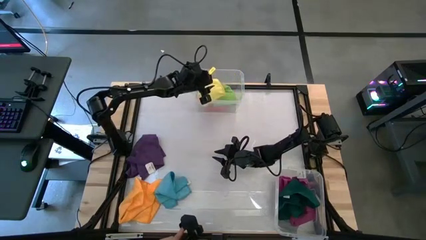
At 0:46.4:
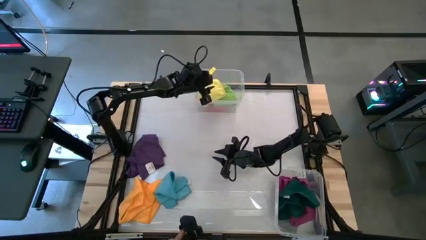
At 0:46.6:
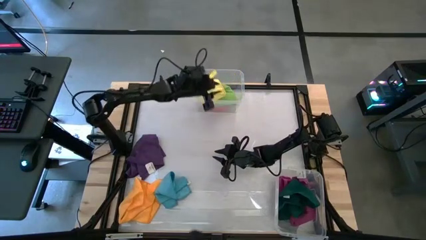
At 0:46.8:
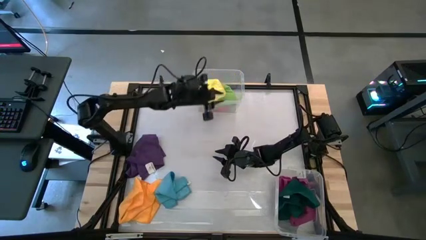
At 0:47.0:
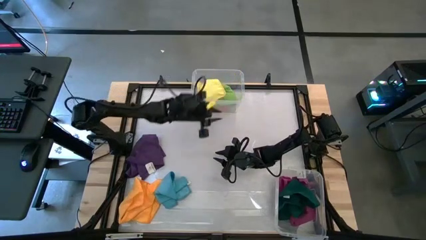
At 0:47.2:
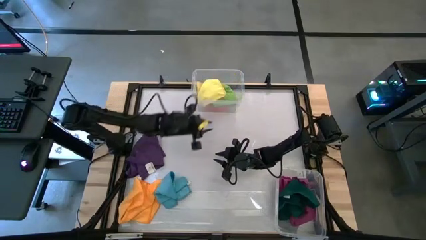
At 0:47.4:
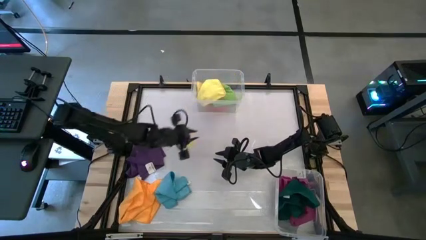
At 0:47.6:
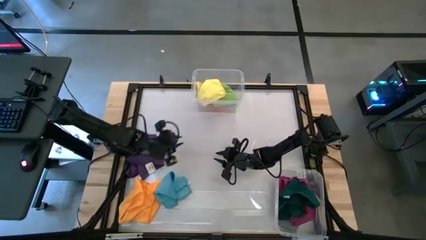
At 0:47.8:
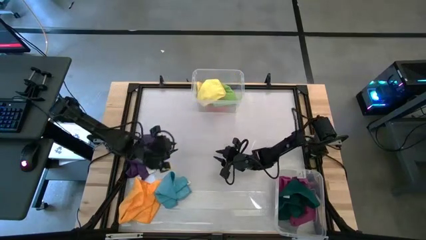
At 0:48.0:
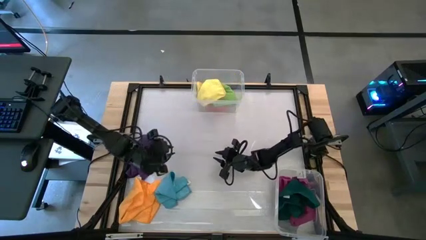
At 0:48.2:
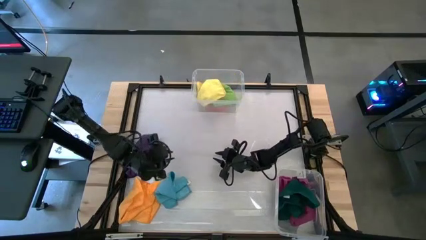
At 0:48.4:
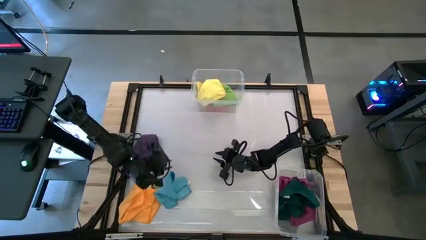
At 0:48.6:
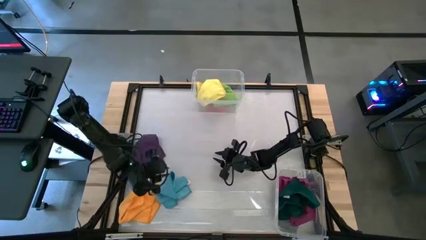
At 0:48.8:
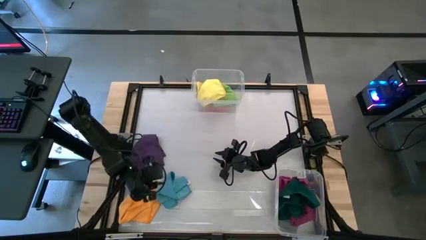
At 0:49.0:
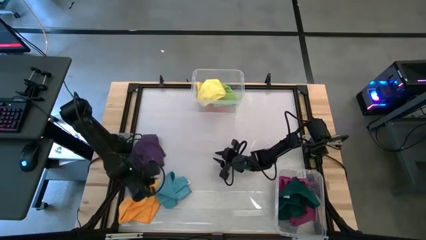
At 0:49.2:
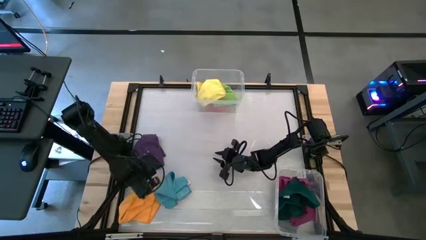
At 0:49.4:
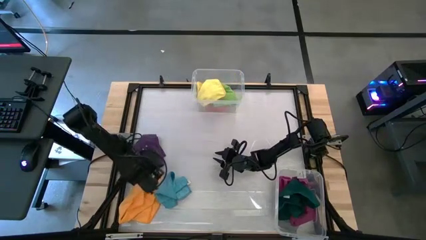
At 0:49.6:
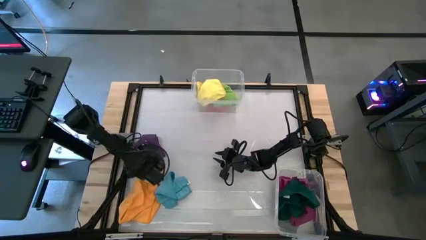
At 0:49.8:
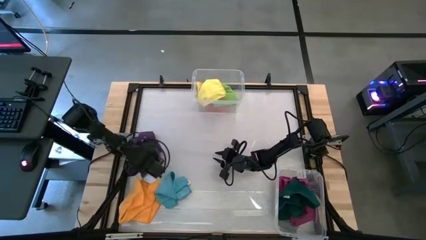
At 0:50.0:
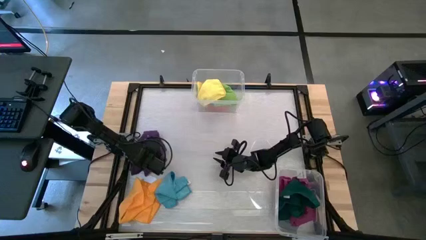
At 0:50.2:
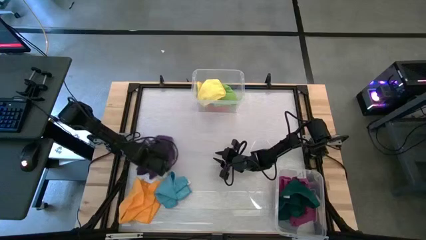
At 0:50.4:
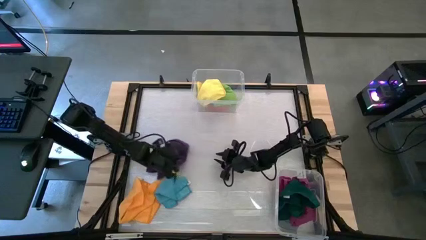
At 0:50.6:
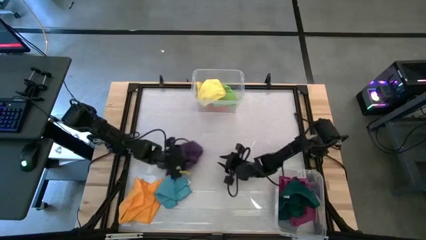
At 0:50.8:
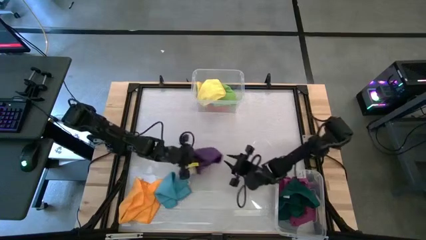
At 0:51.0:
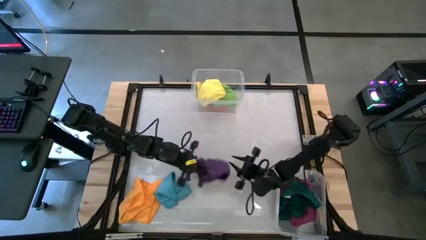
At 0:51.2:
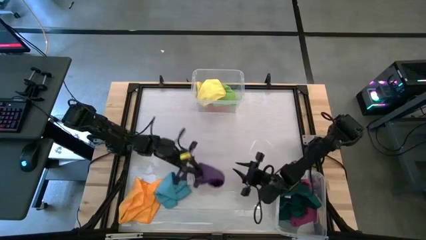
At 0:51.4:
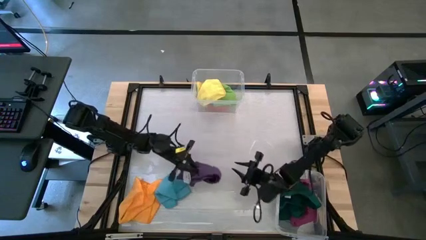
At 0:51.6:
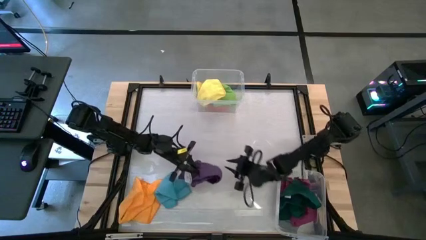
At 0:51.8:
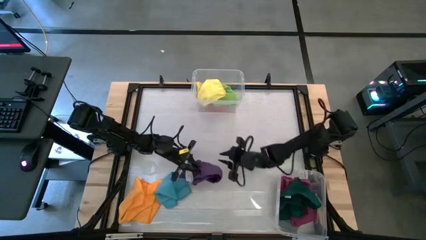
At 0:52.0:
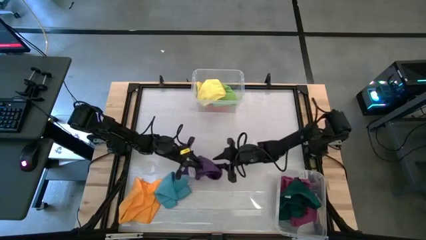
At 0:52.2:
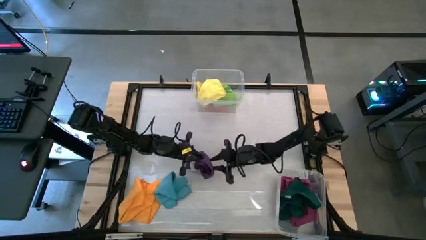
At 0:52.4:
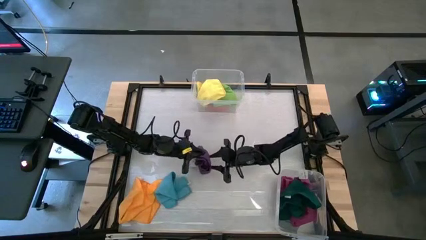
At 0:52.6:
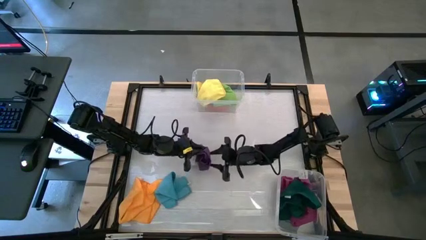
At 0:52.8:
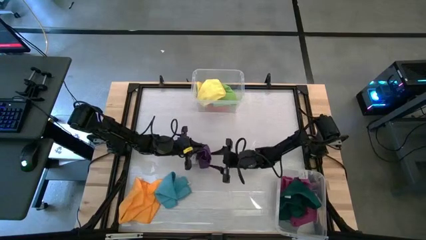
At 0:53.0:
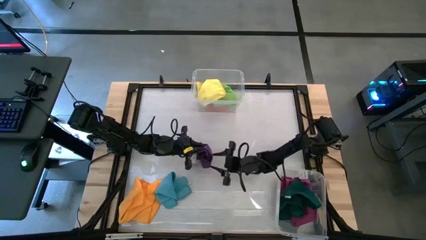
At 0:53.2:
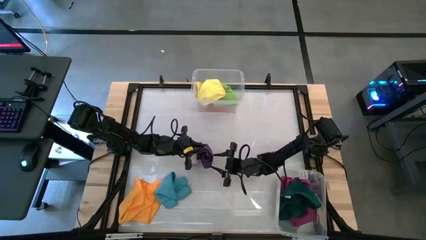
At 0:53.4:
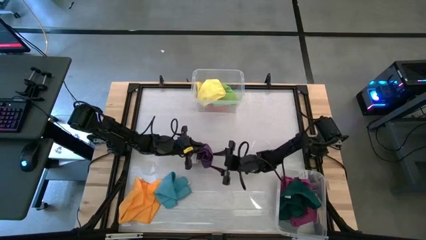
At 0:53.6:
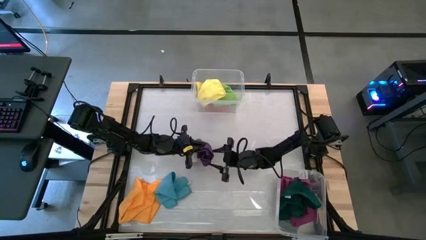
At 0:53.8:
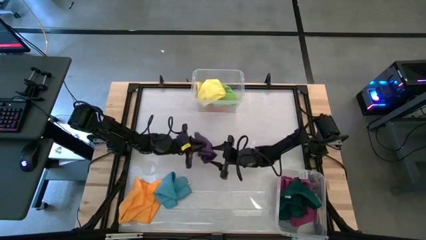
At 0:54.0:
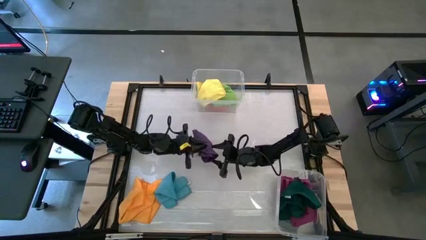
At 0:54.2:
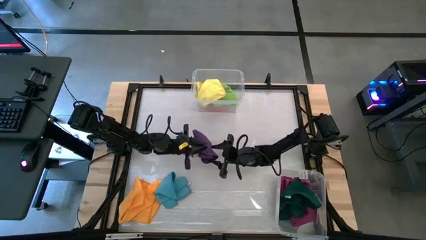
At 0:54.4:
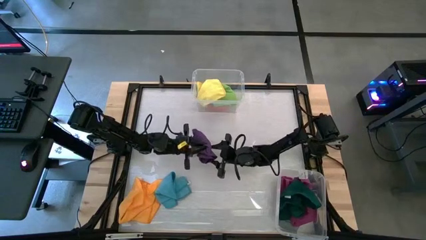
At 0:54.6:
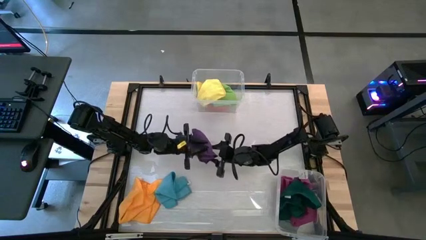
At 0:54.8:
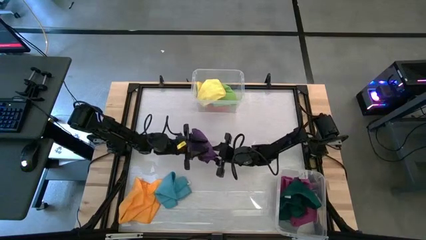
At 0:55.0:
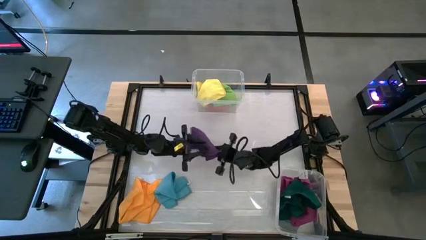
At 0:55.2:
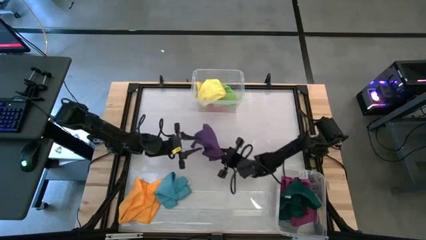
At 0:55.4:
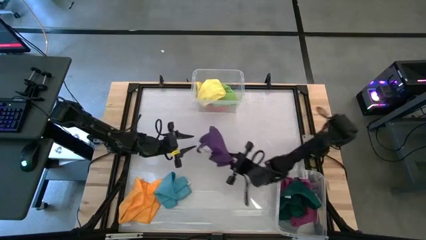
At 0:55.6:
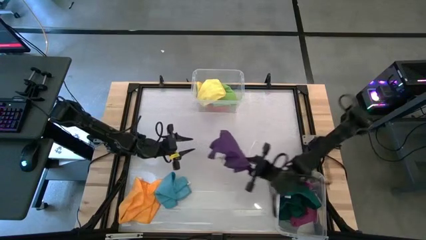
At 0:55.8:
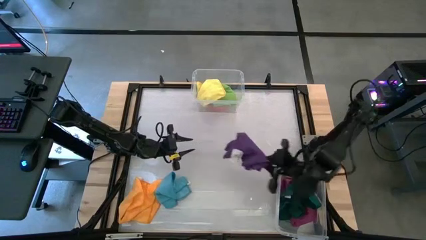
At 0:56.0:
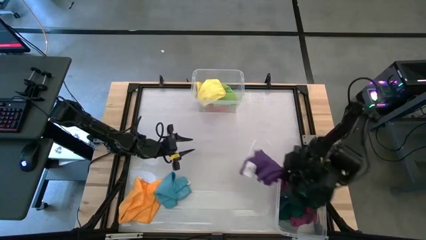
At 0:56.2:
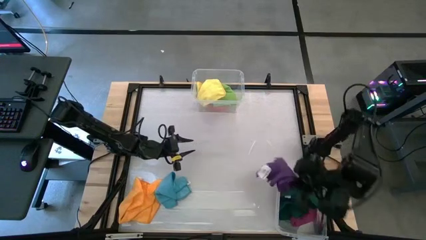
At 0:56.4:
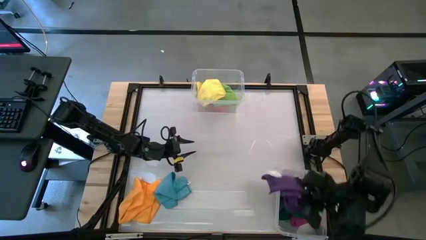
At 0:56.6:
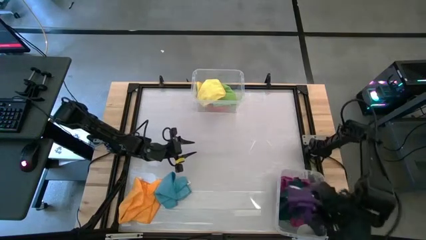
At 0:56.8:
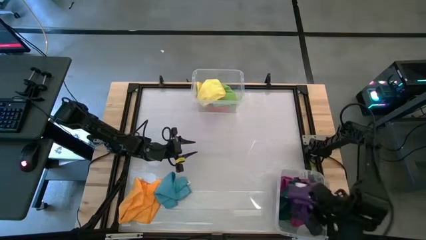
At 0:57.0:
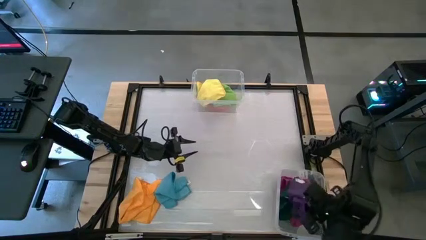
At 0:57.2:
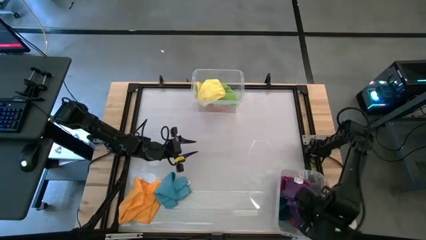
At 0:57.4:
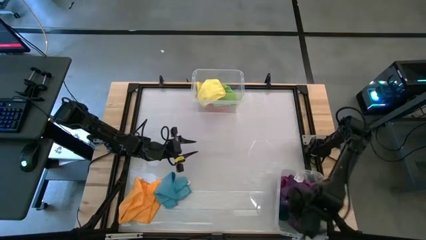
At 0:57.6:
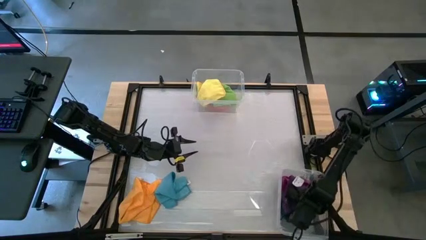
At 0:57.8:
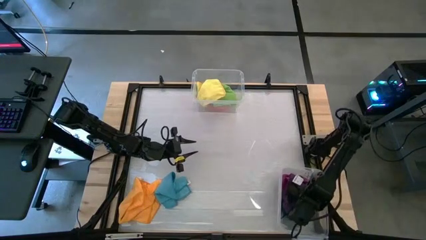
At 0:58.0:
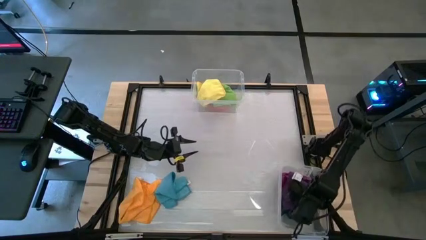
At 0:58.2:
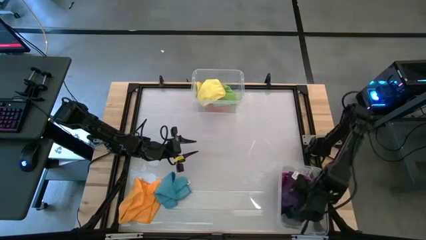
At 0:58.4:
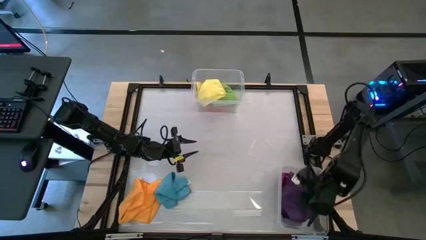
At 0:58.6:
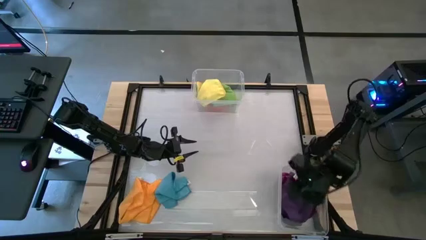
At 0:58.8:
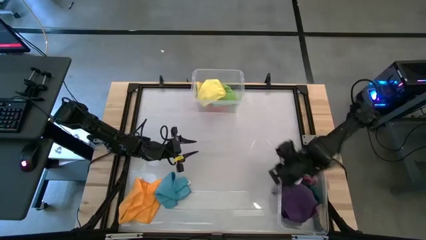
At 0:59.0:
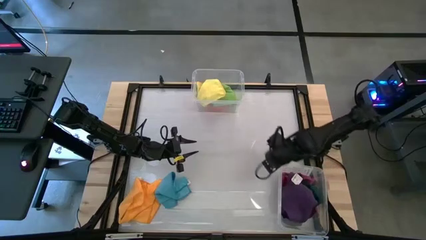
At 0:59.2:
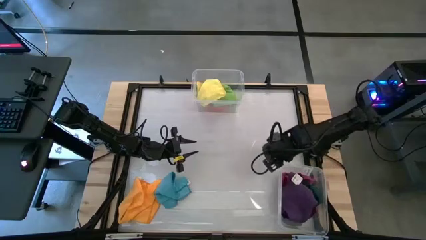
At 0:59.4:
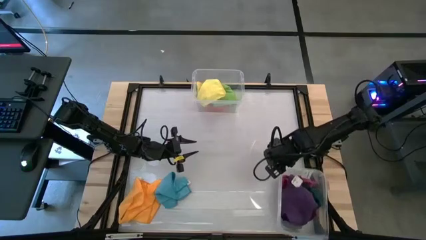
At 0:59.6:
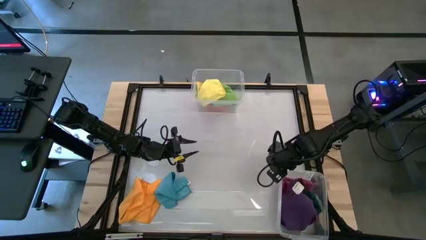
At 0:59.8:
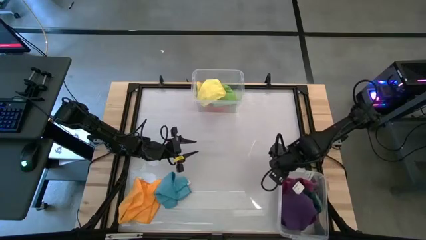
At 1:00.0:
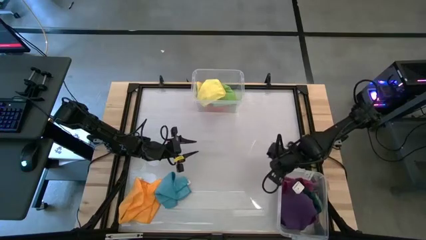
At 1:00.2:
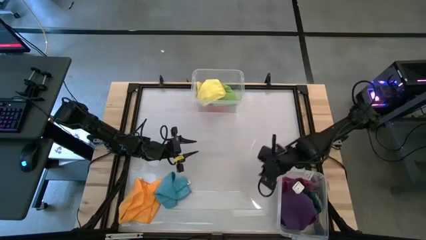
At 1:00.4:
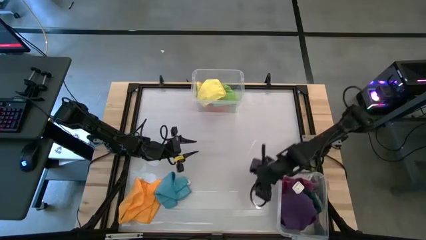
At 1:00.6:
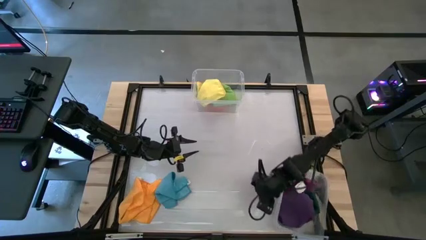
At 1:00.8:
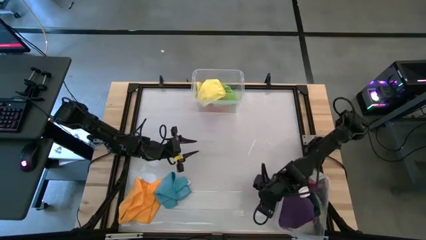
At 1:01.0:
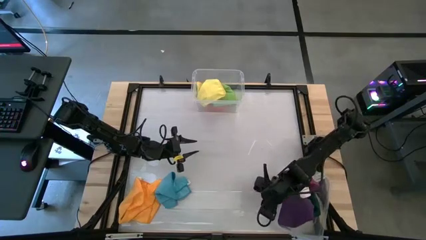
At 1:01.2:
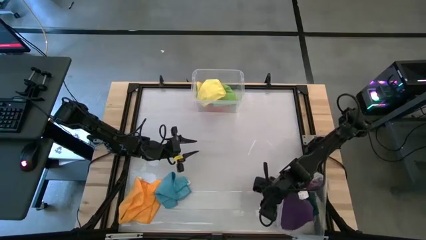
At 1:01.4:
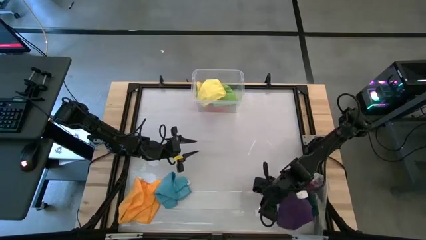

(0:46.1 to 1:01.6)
Task: Sort towels by color in basket
Put the purple microfiber cloth into the bottom transparent bin
